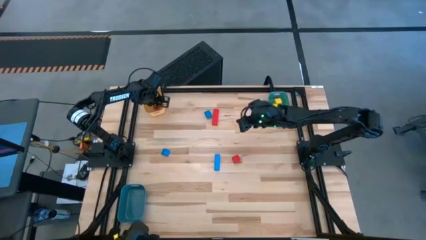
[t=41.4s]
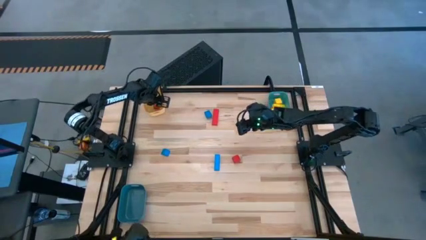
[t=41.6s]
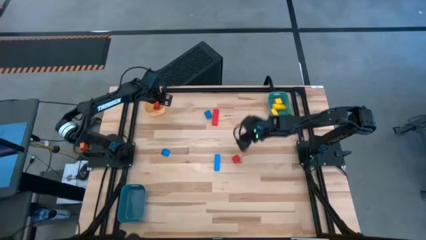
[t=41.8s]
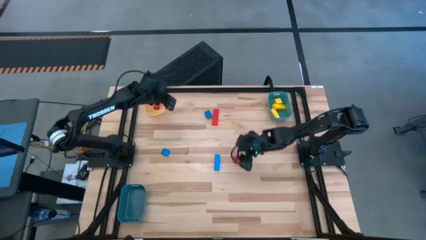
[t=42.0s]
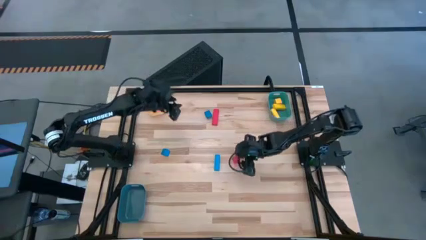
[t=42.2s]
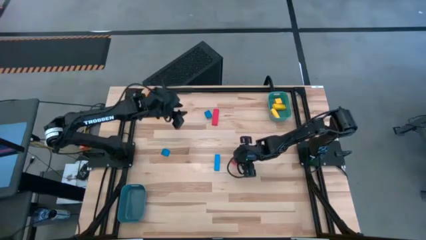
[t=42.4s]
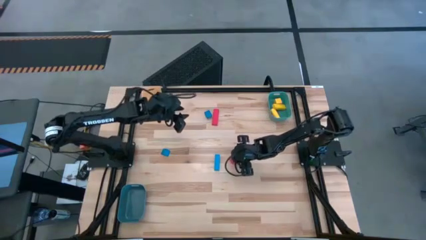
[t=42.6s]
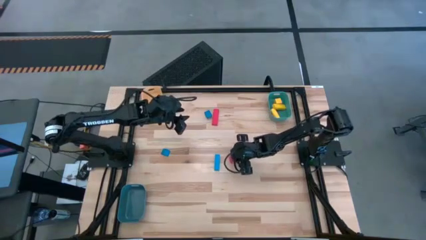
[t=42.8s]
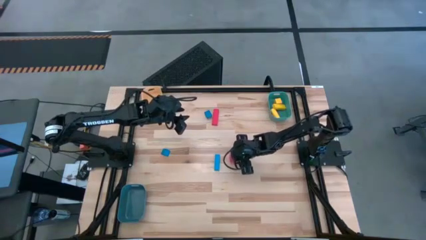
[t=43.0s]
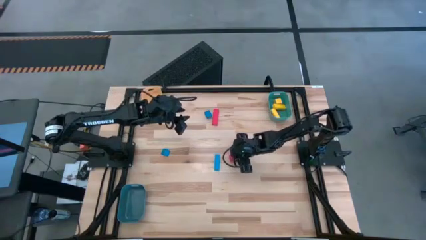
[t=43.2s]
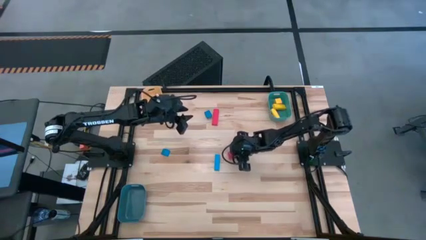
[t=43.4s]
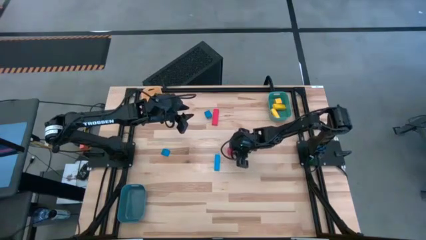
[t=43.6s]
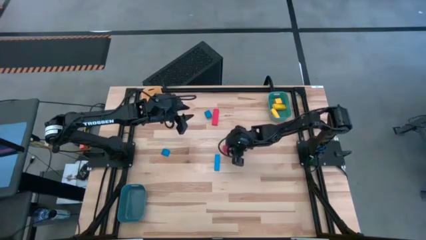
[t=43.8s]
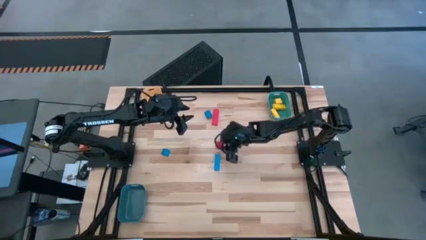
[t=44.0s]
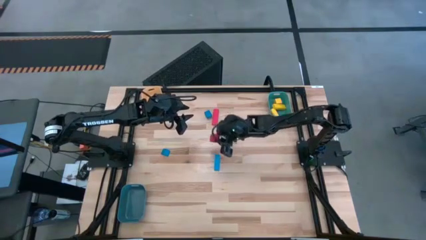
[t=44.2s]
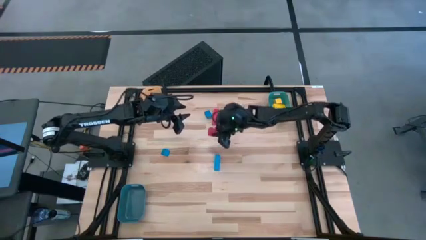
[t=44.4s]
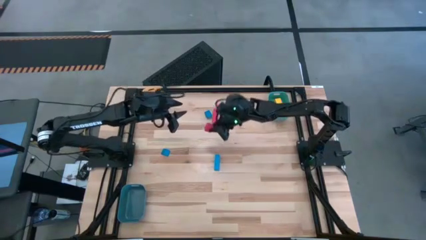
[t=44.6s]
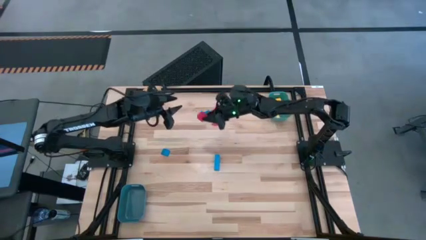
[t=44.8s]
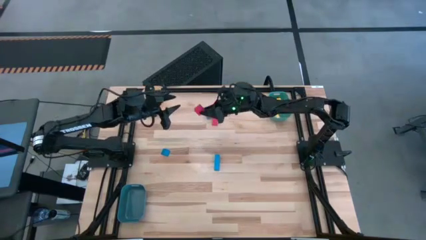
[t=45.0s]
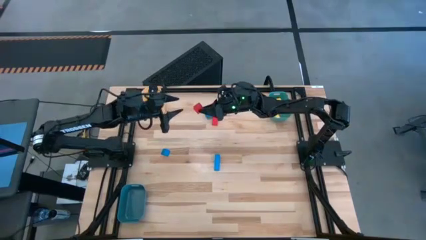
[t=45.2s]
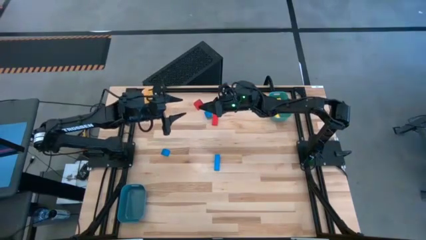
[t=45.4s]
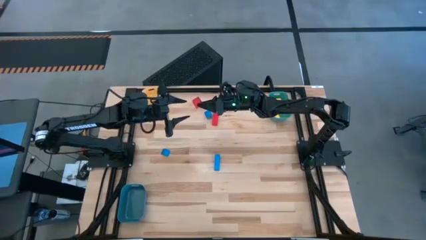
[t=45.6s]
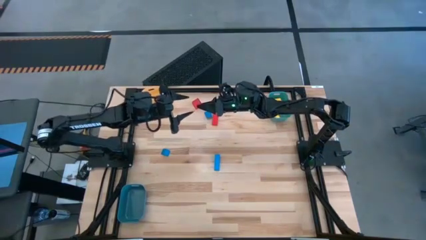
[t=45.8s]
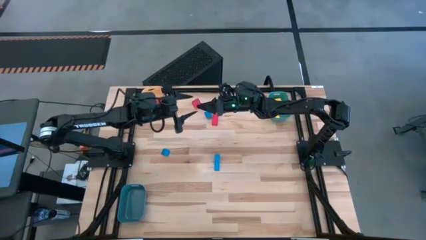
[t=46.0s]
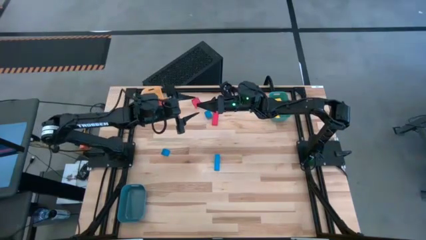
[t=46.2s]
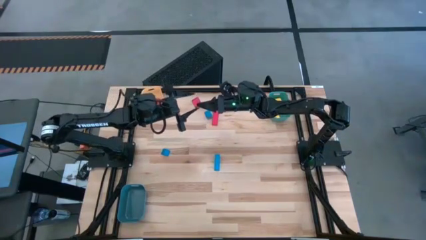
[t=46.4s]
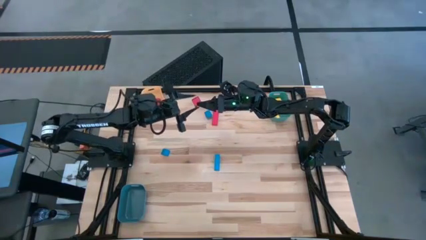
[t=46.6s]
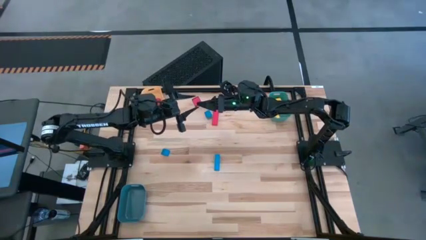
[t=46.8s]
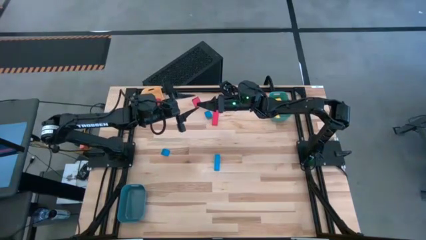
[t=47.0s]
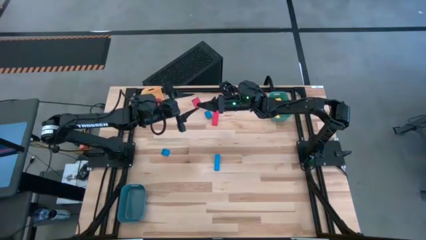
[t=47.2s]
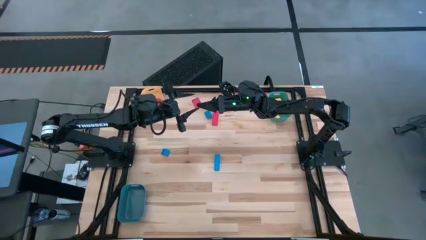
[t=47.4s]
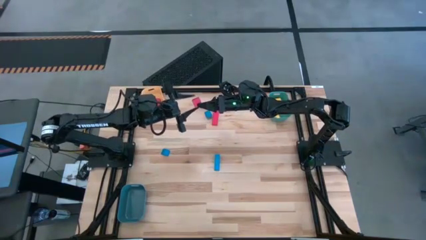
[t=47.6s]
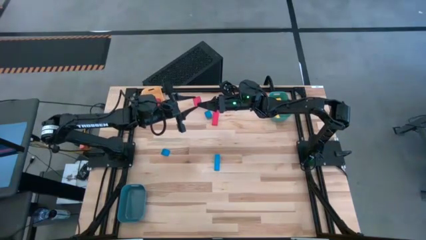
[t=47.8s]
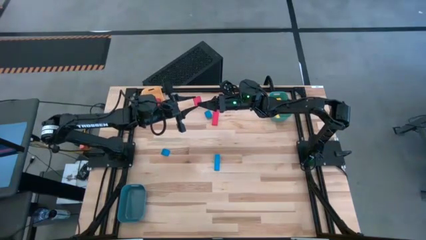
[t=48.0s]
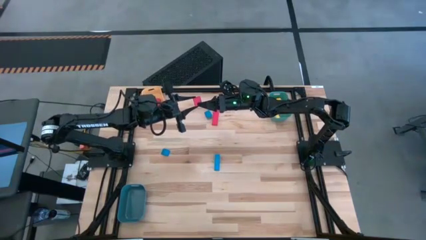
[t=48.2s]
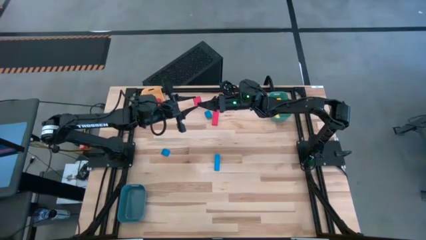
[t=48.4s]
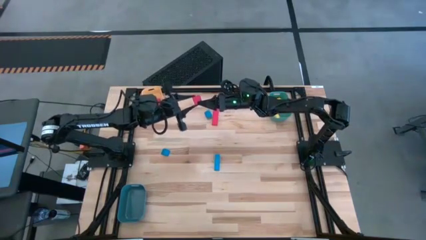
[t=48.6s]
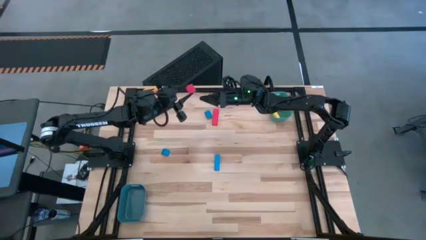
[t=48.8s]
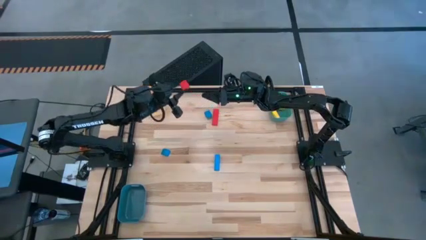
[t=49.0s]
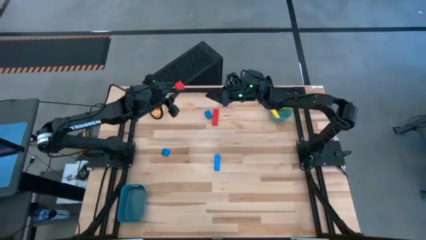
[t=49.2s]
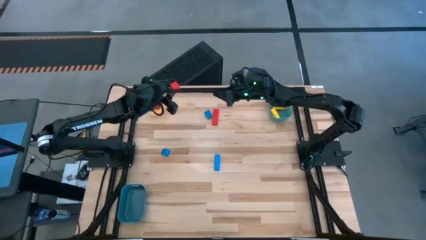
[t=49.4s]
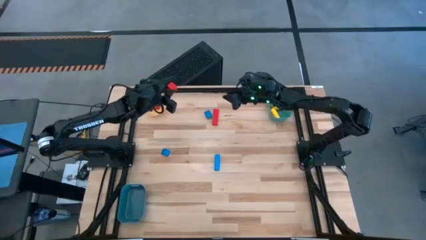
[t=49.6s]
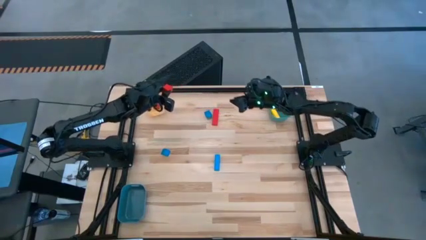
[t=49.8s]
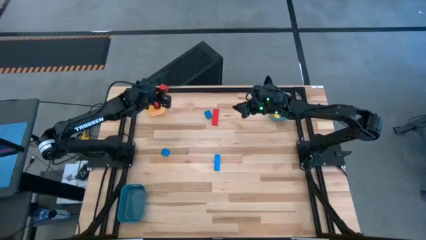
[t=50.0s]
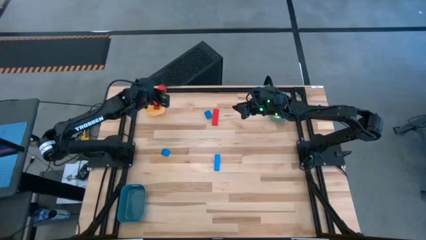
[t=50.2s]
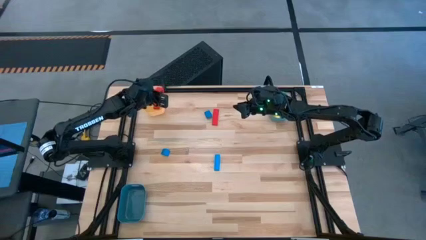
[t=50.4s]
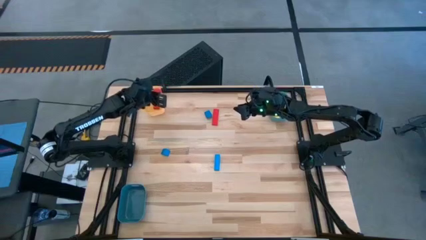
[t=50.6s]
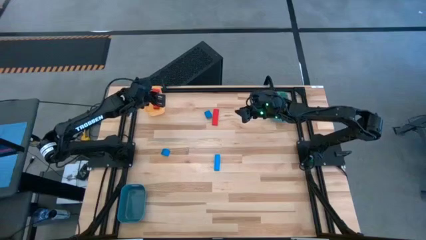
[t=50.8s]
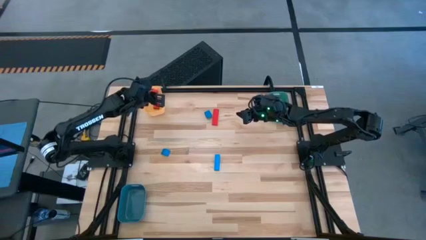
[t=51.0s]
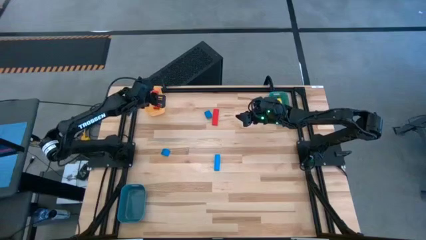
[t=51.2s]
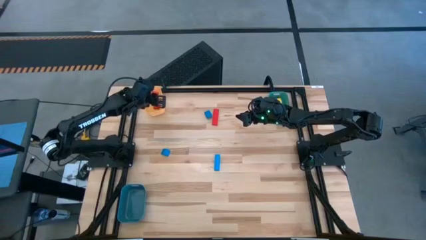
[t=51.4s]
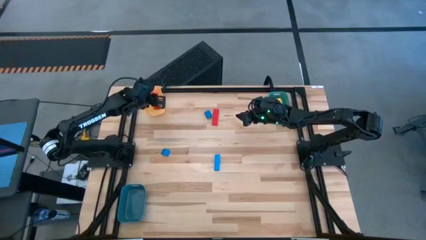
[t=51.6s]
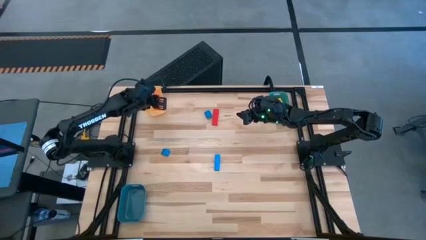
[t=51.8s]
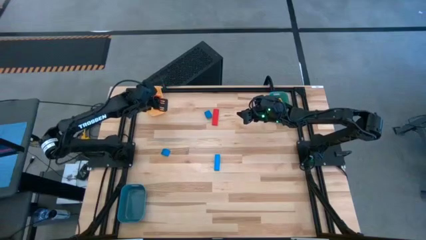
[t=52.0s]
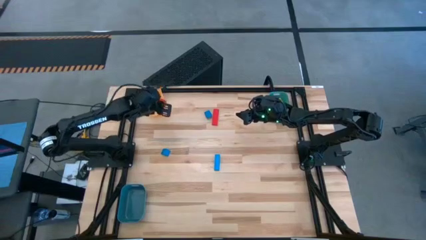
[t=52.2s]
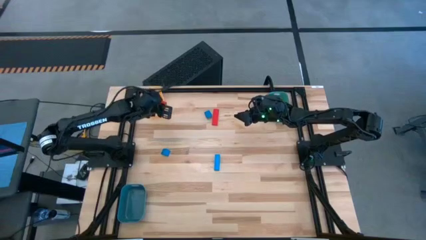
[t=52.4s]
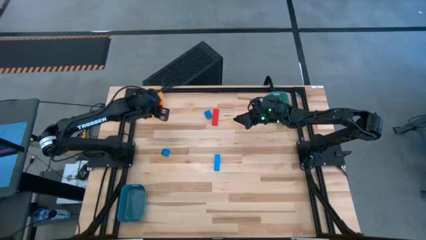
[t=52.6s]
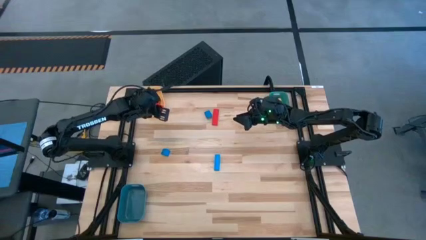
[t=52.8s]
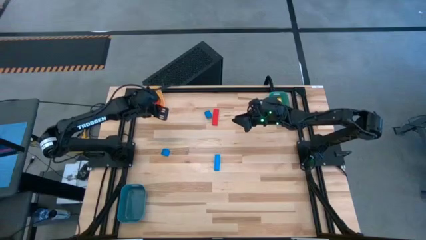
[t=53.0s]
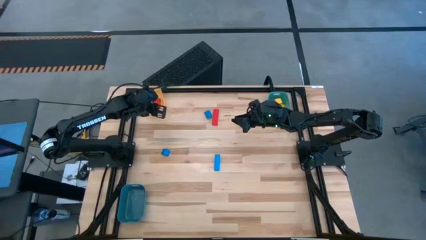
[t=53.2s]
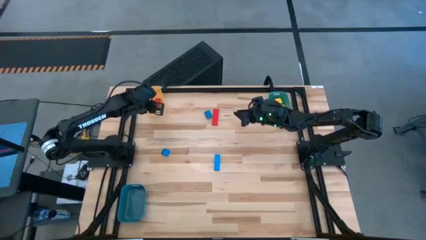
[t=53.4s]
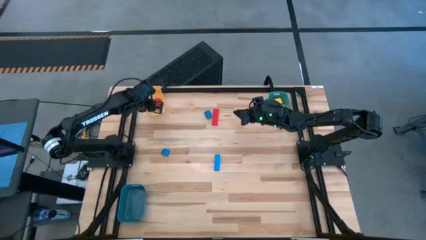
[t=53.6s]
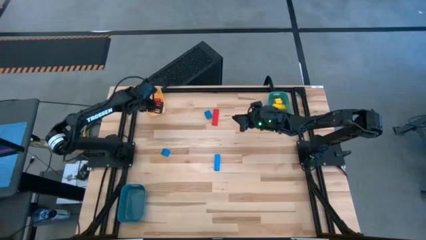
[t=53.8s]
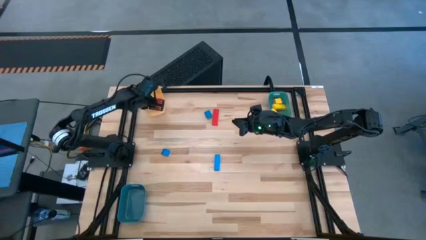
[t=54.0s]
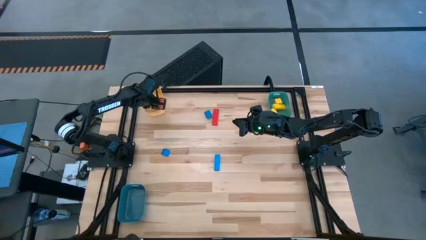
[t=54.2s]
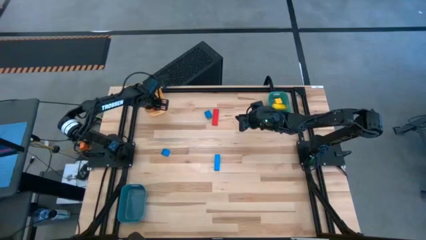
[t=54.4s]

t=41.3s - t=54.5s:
Task: Sort & place blocks by color
Put the bottom red block into the orange bin
